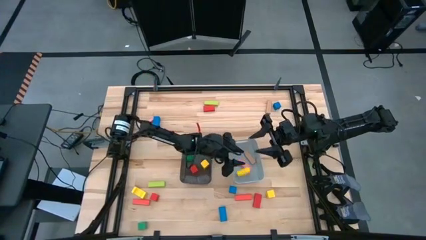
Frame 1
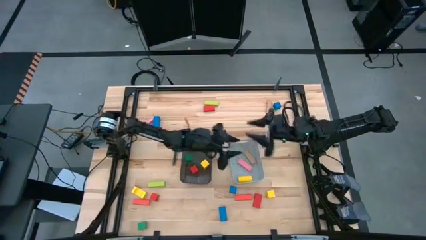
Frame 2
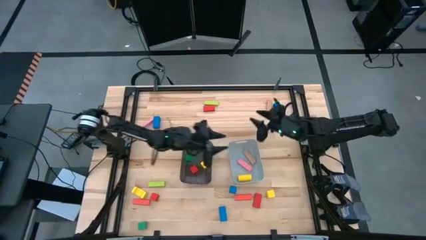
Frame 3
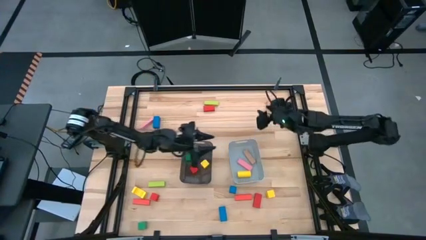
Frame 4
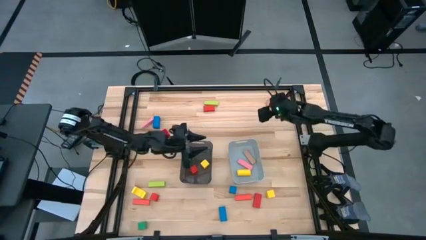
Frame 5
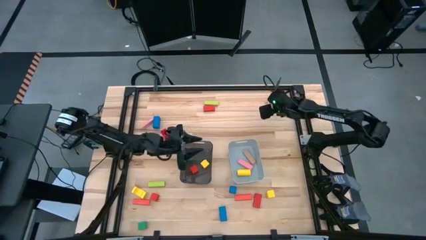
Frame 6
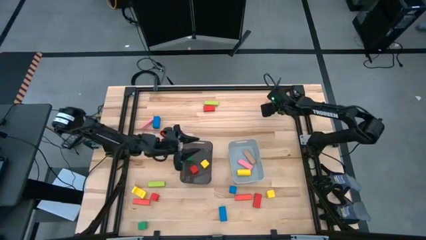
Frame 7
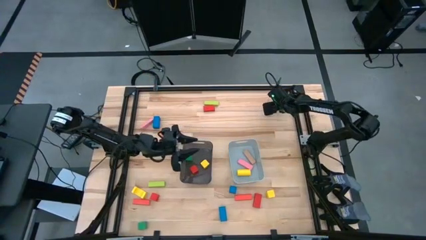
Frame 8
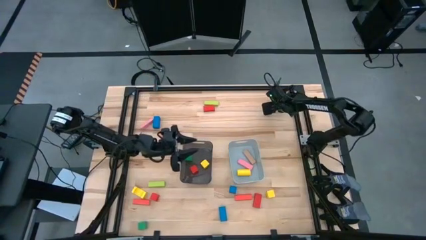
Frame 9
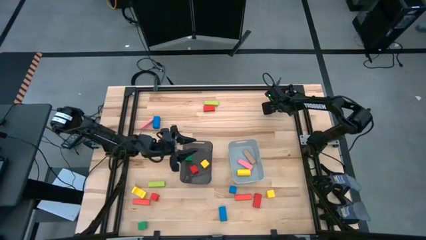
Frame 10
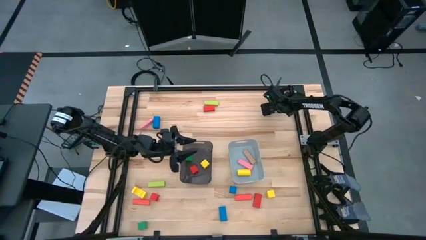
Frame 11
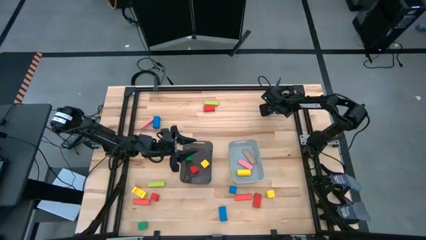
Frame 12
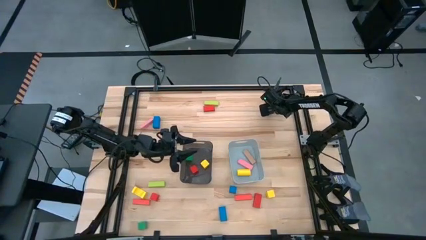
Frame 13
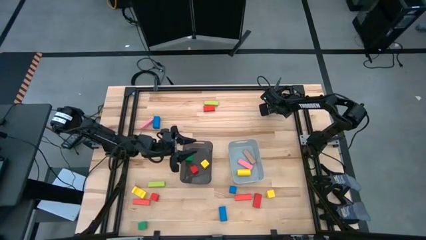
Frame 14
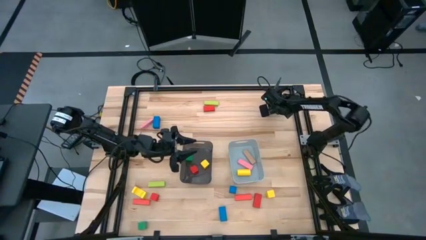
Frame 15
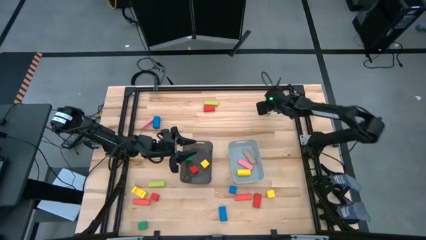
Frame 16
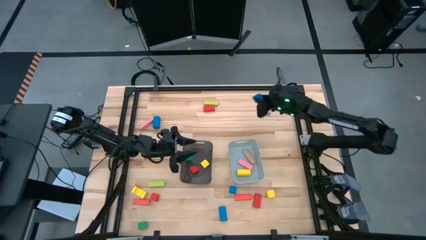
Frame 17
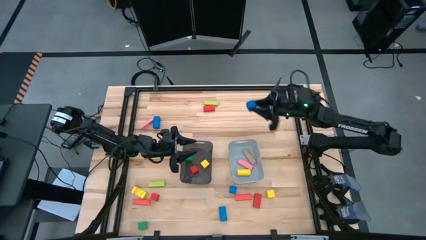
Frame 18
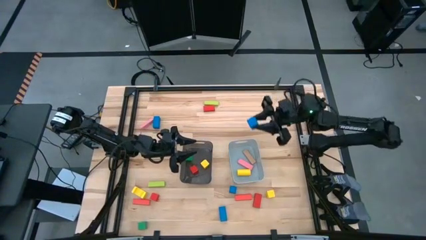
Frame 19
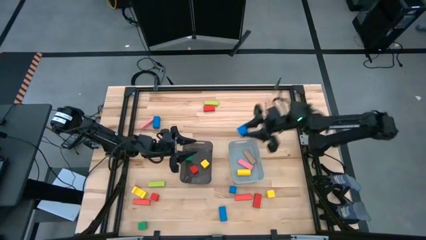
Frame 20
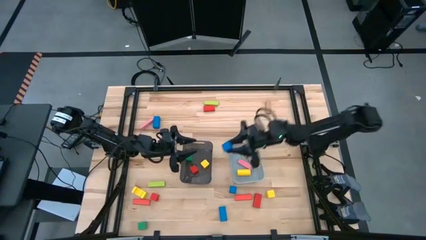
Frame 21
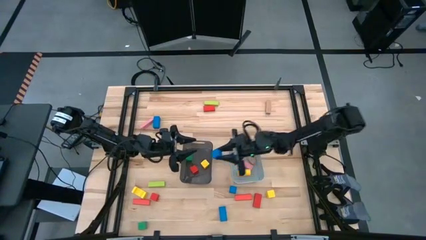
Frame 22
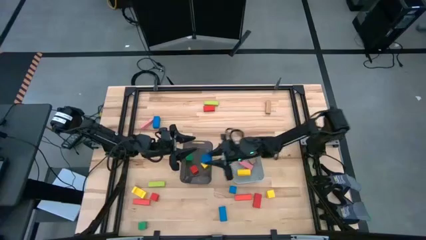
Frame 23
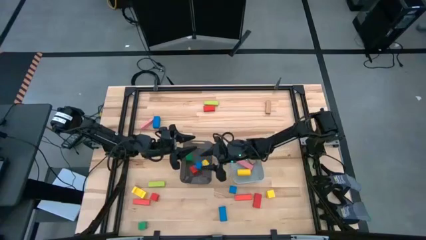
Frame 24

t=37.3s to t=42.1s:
Task: Sort blocks by size
Put the top small blue block into the black bin

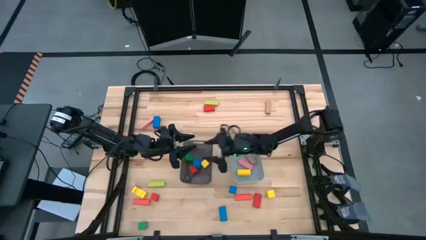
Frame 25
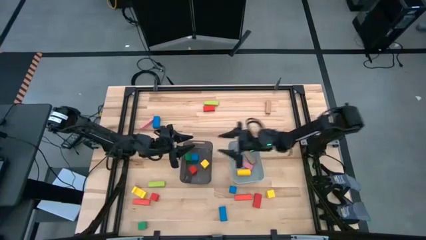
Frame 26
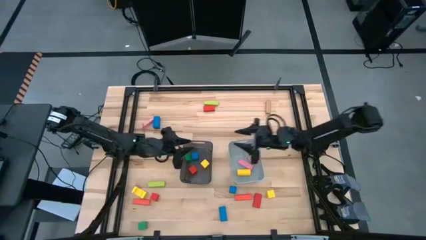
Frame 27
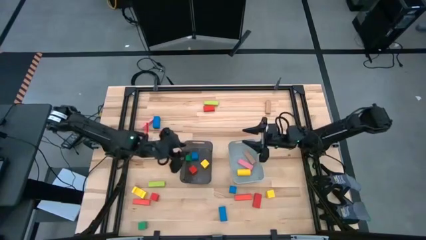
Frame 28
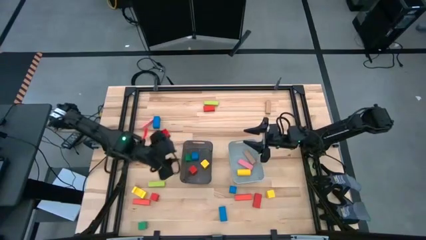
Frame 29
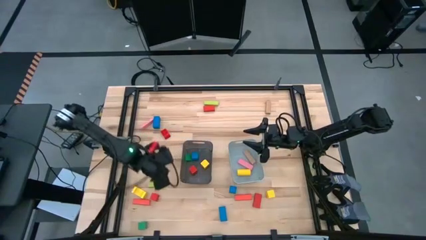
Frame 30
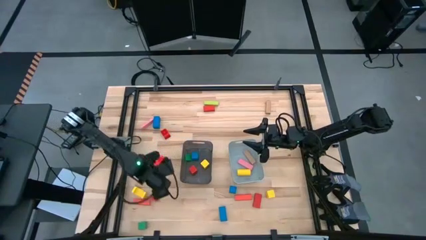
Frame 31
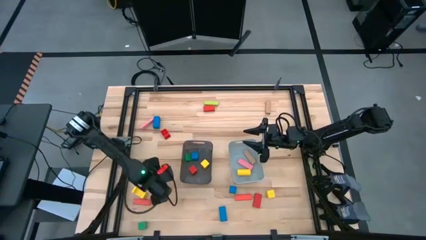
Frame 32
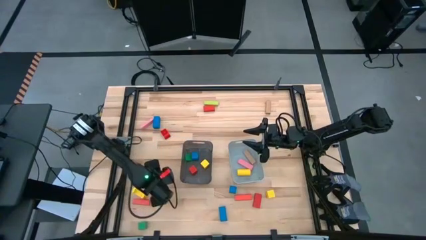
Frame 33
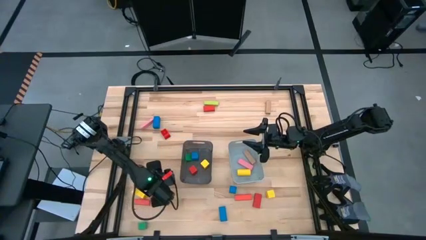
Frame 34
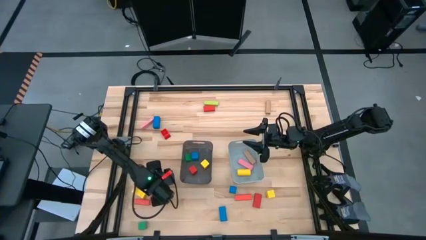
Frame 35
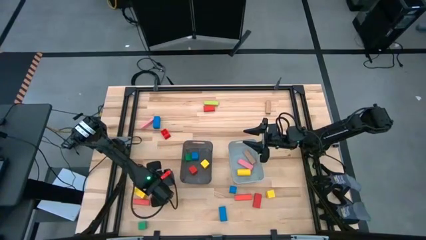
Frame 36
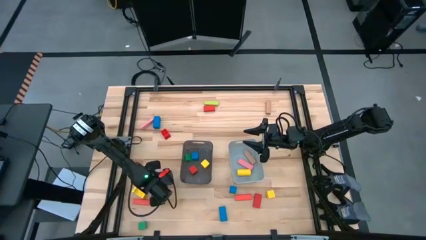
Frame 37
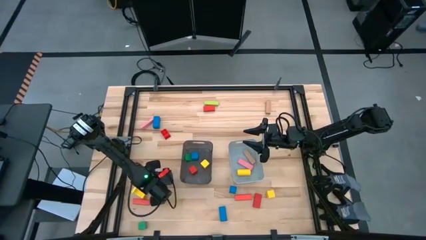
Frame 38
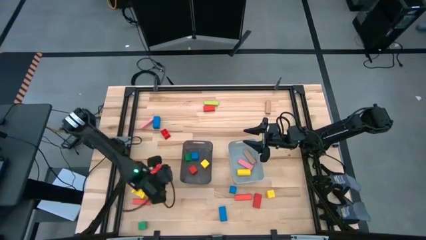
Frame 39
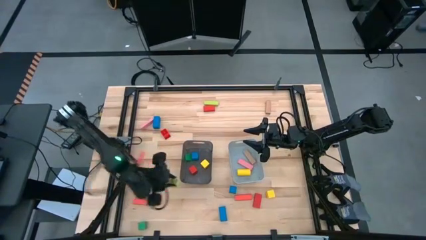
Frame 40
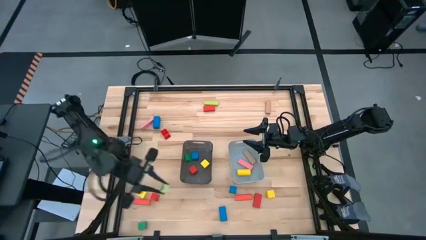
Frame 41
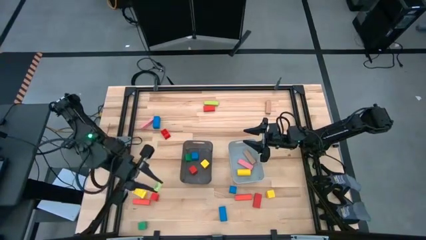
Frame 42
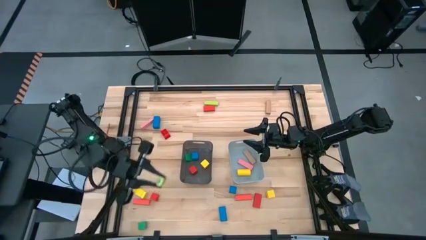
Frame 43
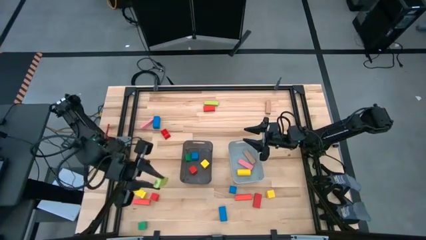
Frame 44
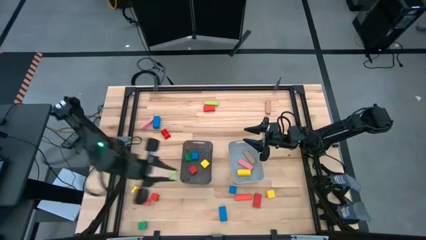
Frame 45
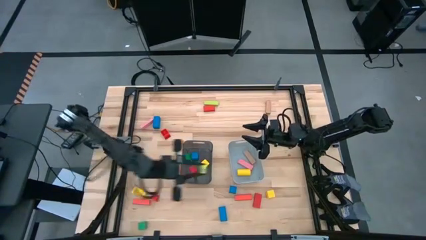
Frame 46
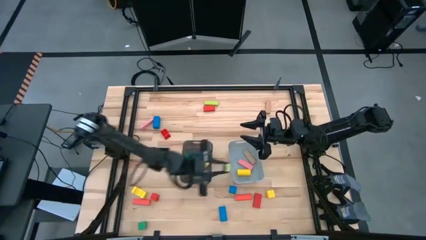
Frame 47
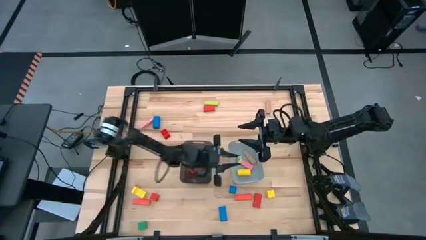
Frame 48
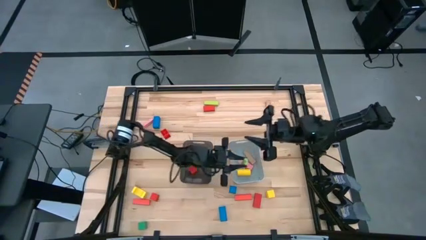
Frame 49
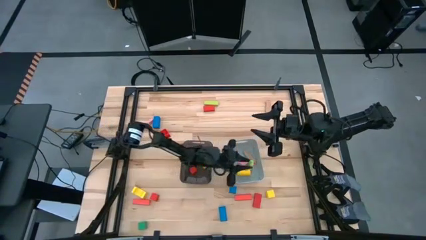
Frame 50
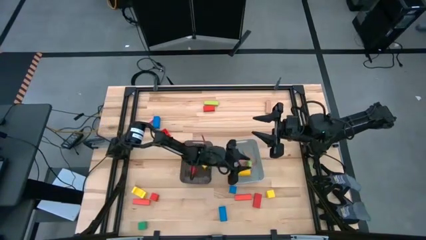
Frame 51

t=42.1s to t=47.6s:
Put the bottom large green block into the gray bin

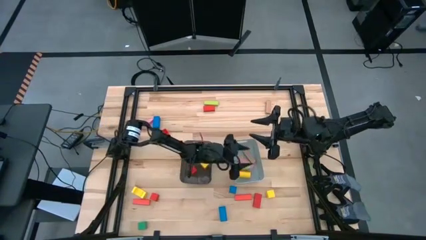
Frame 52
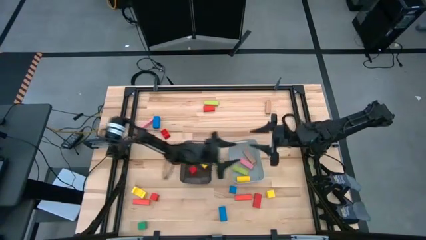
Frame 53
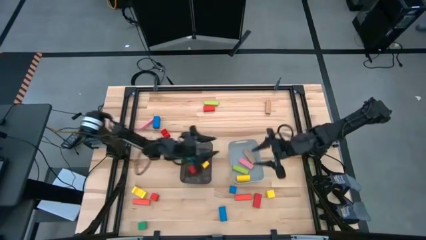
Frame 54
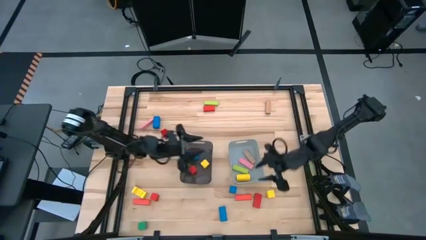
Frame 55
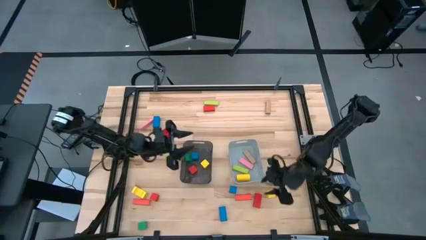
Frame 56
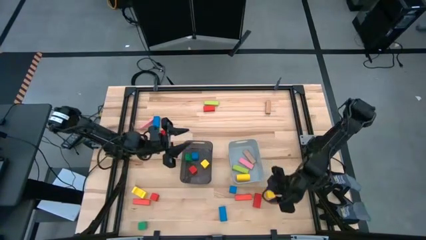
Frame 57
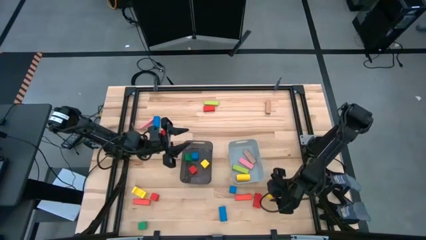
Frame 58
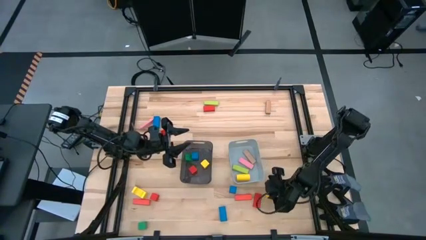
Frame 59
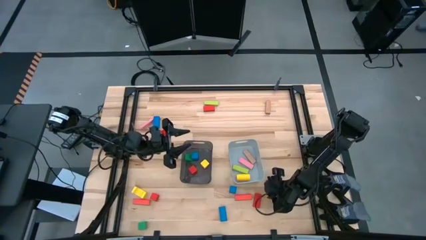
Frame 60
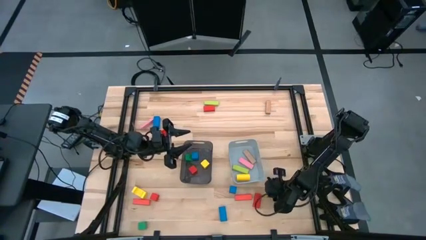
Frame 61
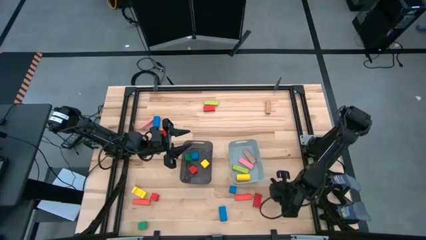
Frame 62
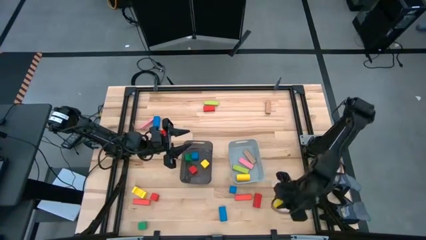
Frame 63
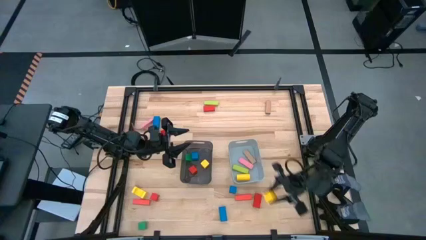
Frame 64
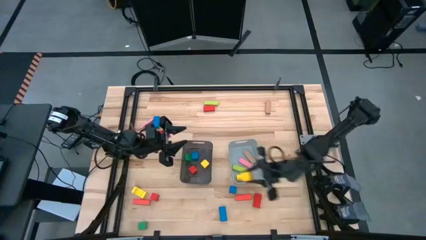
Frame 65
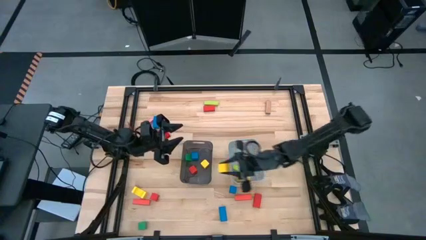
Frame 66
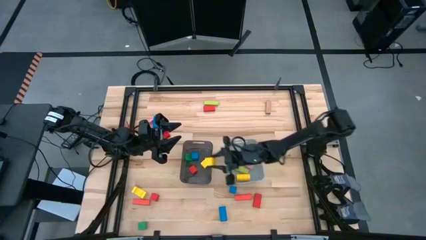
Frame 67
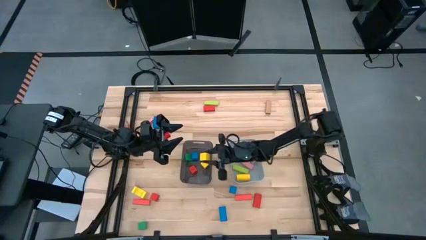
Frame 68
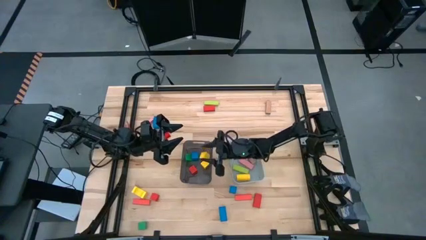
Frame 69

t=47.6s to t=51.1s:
Put the small yellow block into the black bin

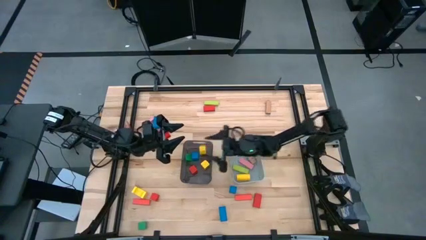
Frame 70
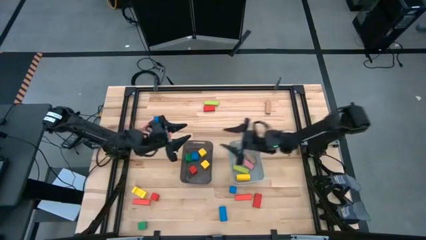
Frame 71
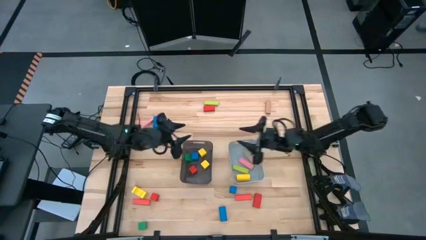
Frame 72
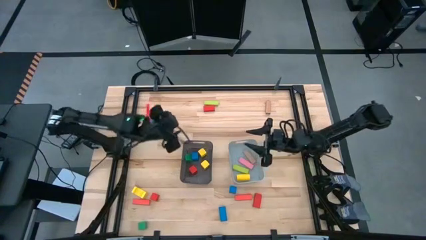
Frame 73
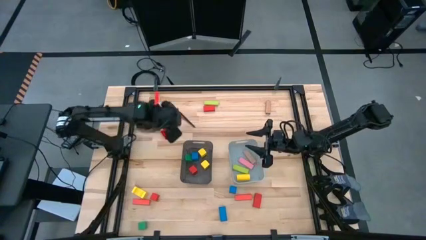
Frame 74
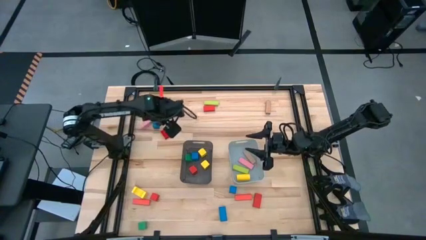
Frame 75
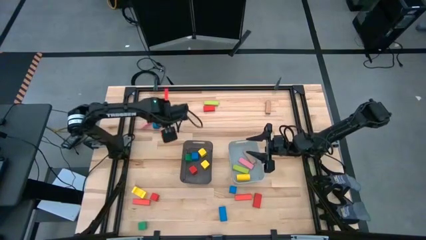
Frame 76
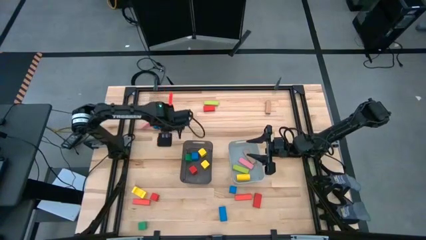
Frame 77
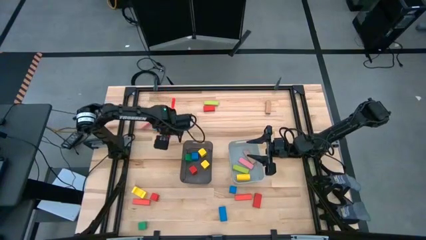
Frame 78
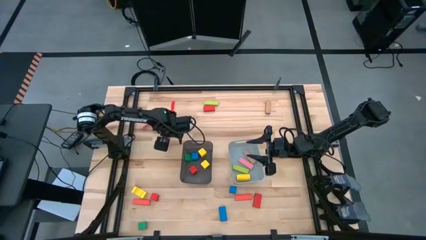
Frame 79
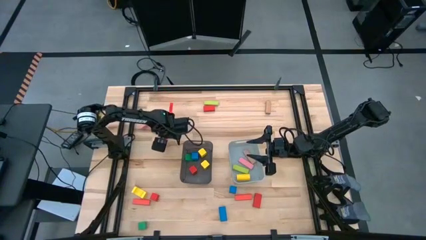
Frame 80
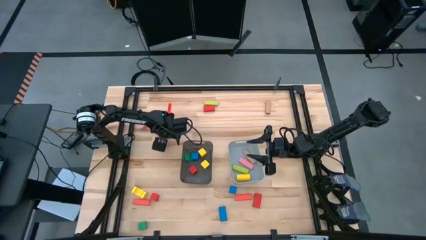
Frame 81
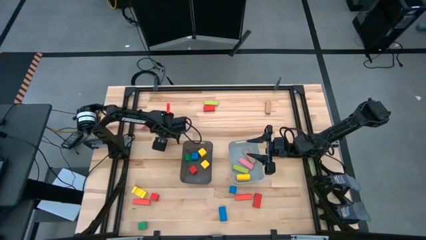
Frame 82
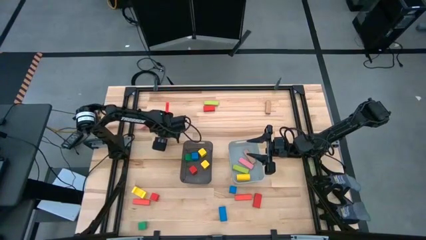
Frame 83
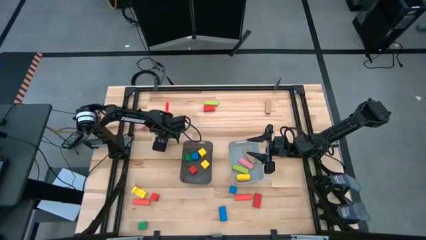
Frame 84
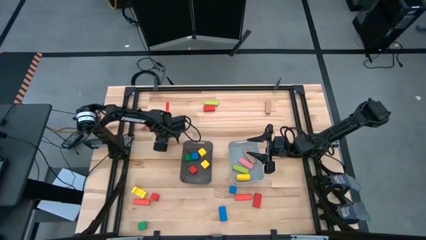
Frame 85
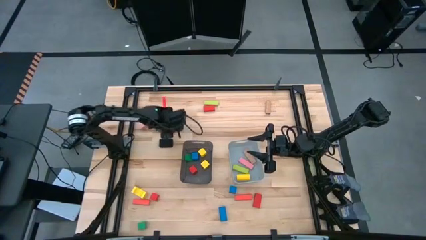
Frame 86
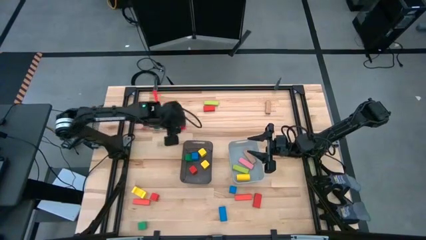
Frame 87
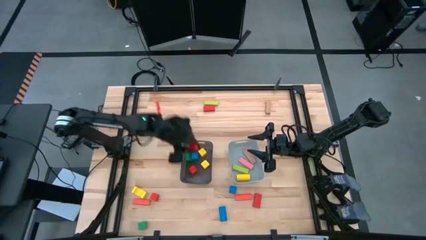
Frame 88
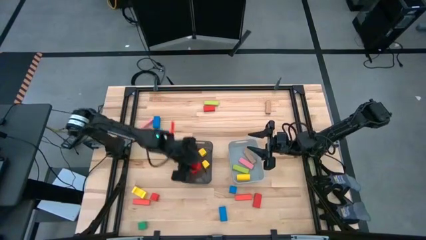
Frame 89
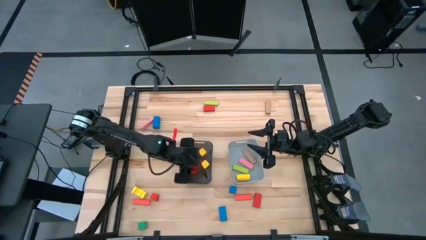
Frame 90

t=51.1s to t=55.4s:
Put the small red game piece into the black bin
